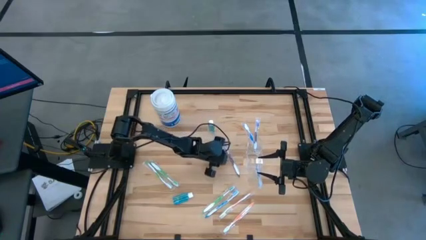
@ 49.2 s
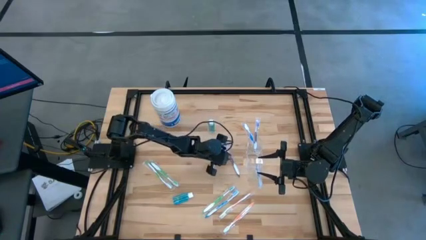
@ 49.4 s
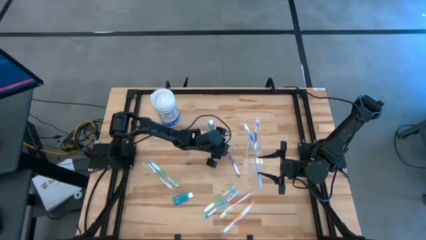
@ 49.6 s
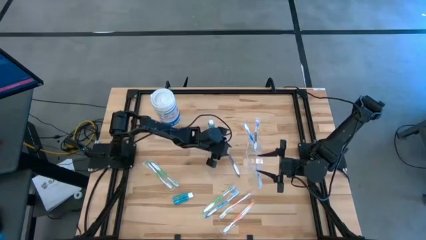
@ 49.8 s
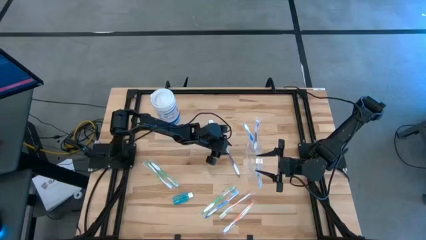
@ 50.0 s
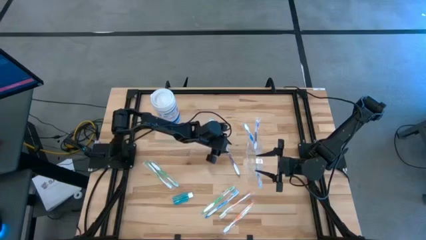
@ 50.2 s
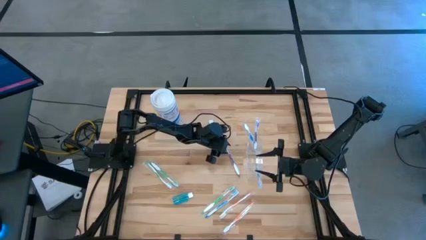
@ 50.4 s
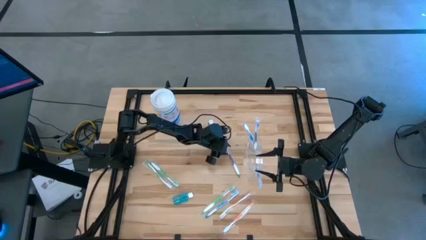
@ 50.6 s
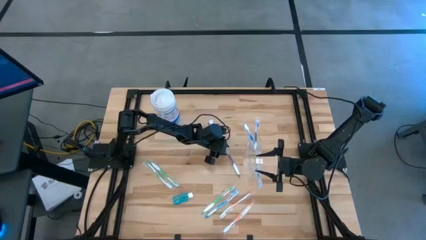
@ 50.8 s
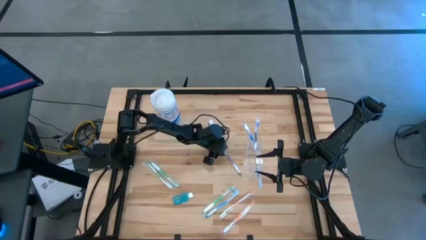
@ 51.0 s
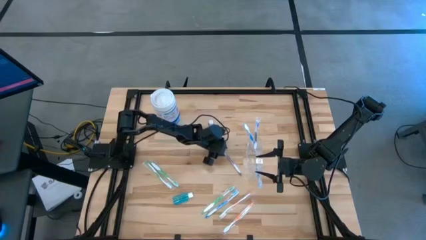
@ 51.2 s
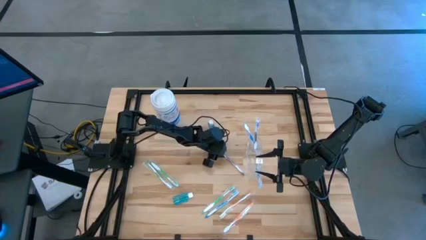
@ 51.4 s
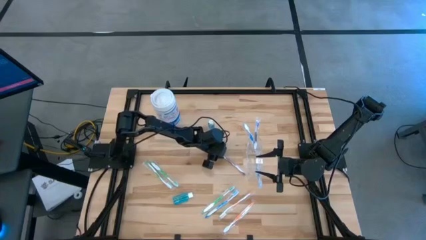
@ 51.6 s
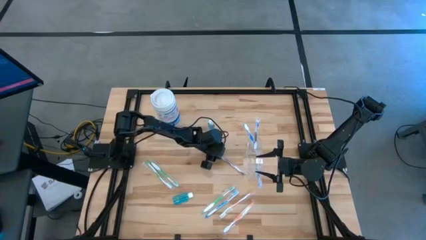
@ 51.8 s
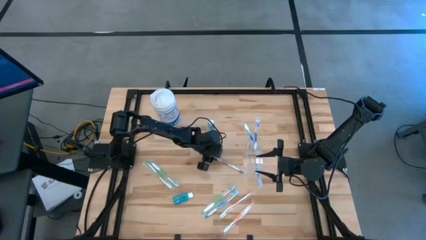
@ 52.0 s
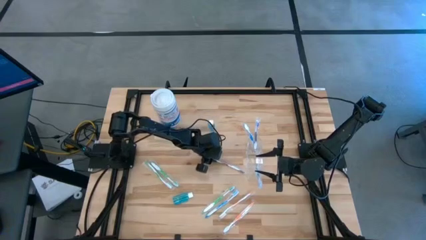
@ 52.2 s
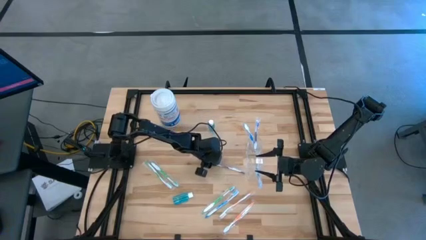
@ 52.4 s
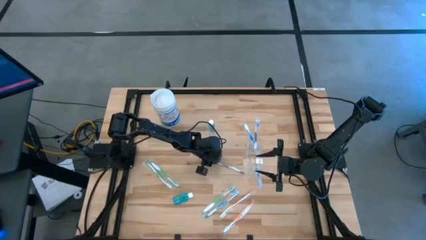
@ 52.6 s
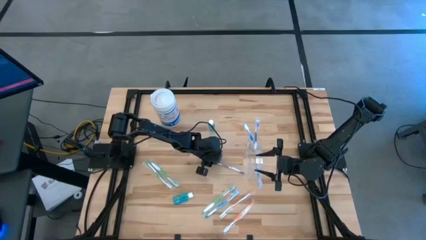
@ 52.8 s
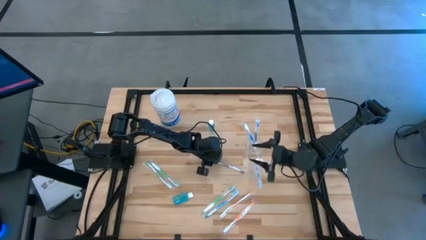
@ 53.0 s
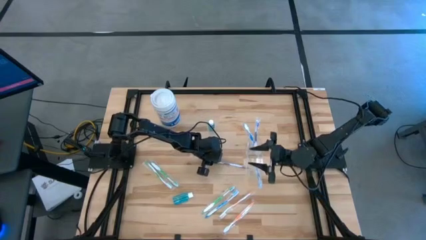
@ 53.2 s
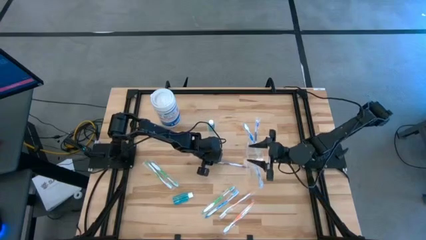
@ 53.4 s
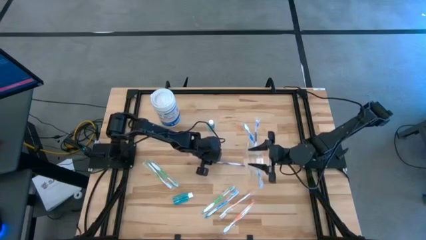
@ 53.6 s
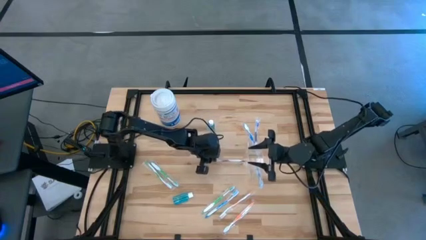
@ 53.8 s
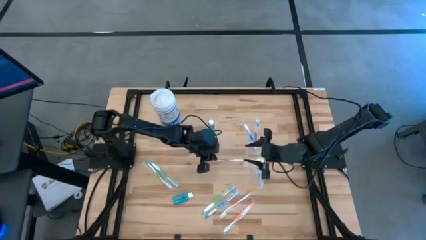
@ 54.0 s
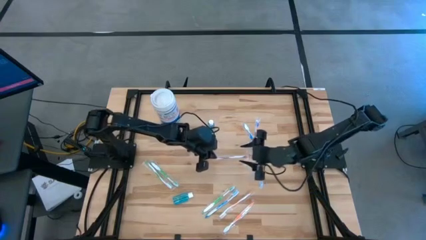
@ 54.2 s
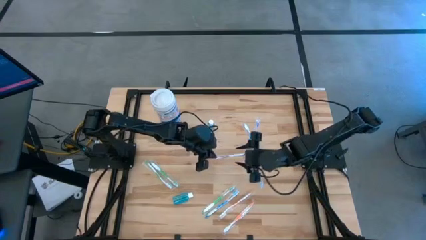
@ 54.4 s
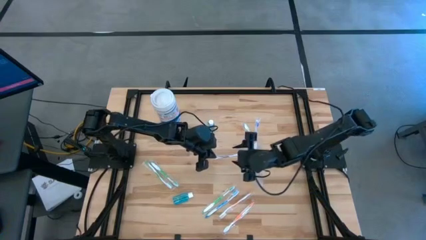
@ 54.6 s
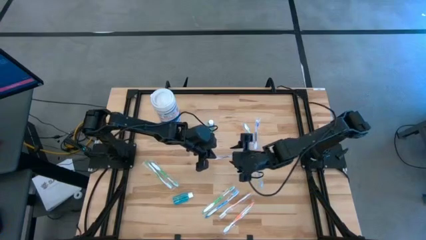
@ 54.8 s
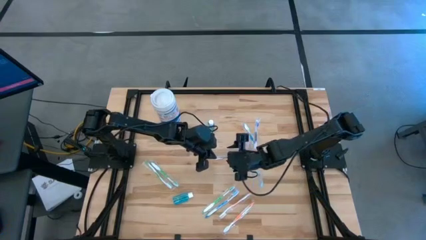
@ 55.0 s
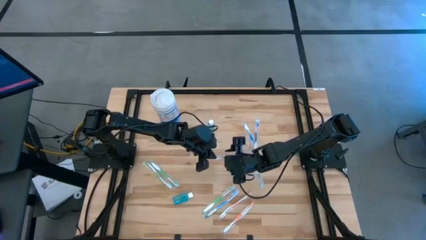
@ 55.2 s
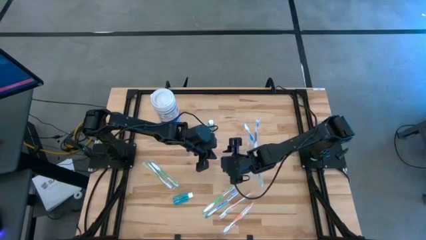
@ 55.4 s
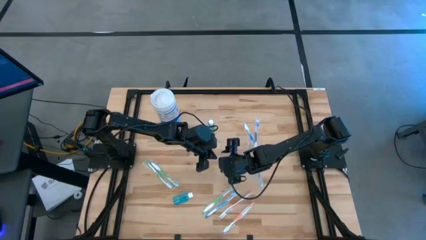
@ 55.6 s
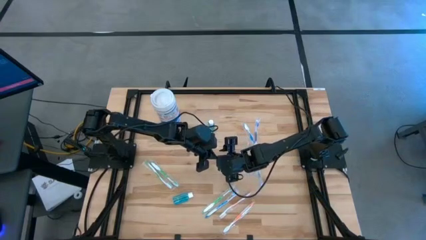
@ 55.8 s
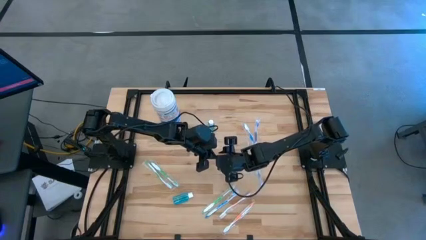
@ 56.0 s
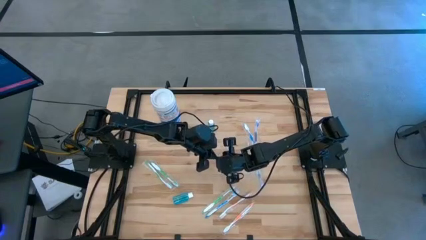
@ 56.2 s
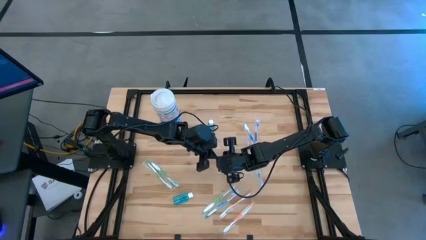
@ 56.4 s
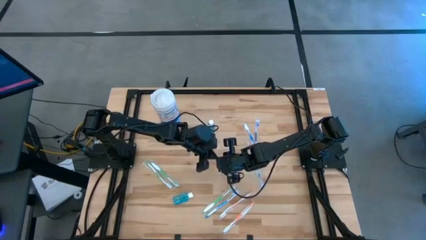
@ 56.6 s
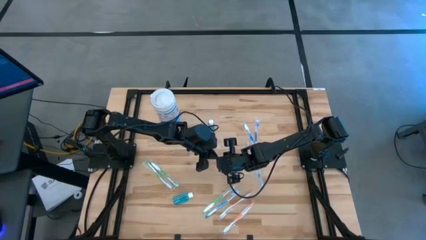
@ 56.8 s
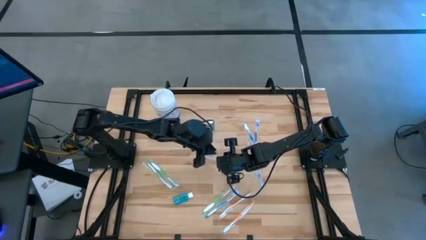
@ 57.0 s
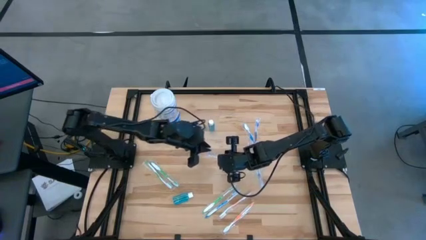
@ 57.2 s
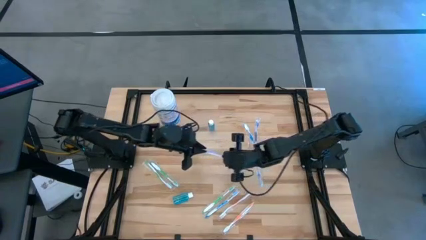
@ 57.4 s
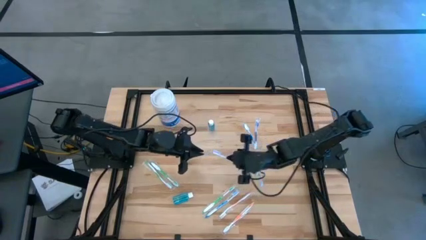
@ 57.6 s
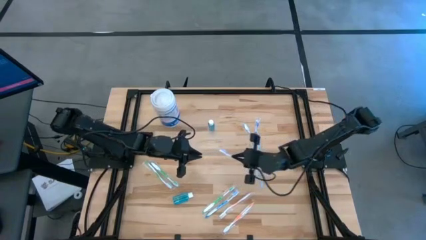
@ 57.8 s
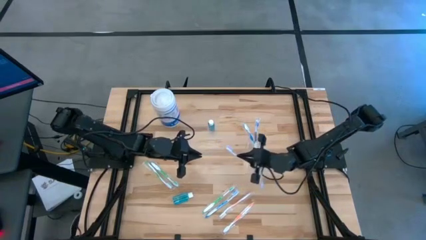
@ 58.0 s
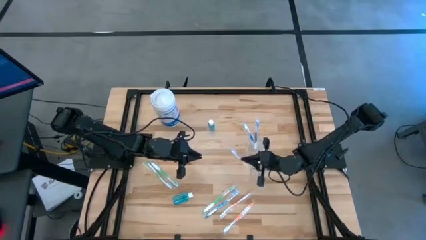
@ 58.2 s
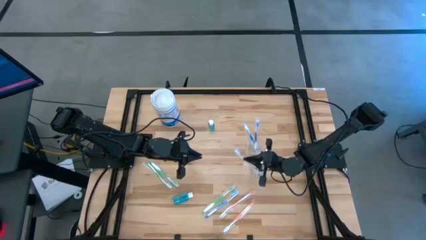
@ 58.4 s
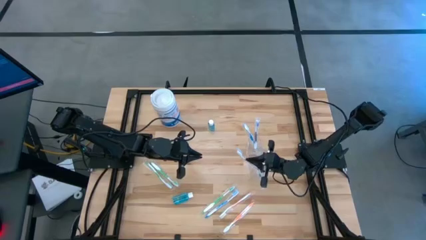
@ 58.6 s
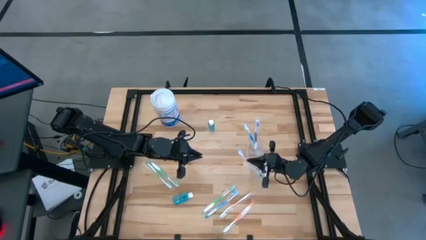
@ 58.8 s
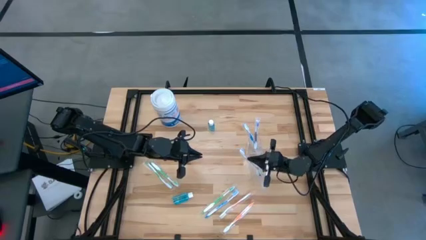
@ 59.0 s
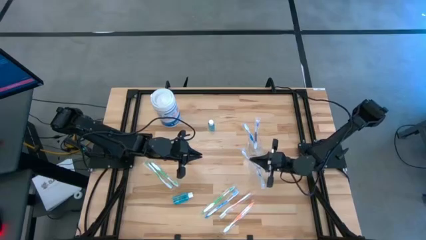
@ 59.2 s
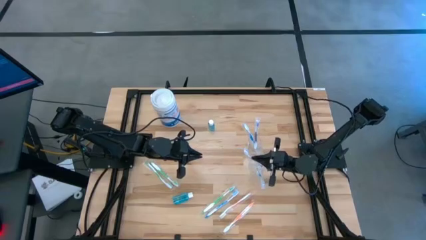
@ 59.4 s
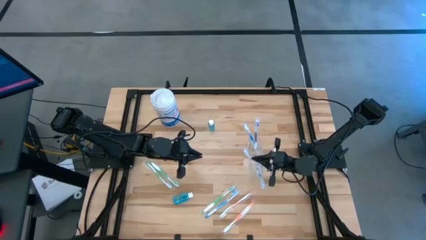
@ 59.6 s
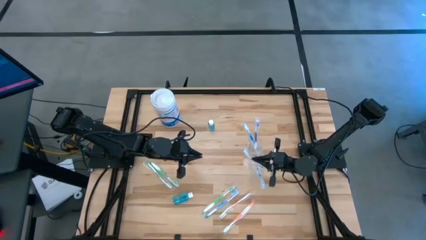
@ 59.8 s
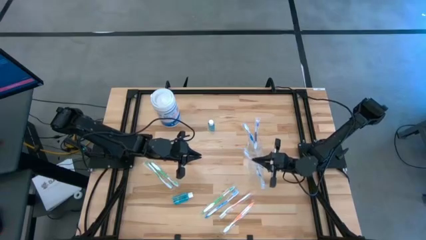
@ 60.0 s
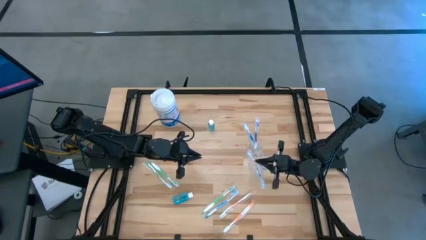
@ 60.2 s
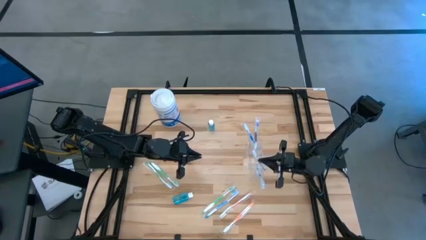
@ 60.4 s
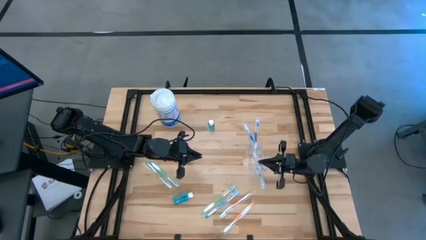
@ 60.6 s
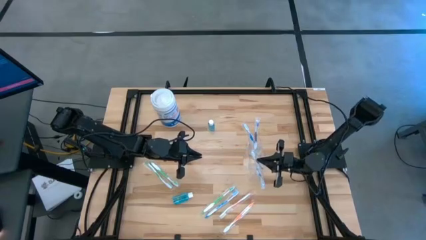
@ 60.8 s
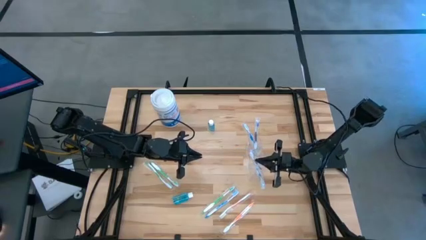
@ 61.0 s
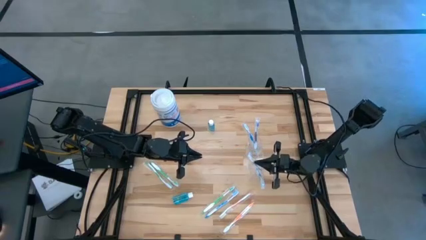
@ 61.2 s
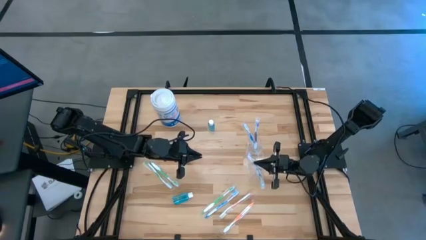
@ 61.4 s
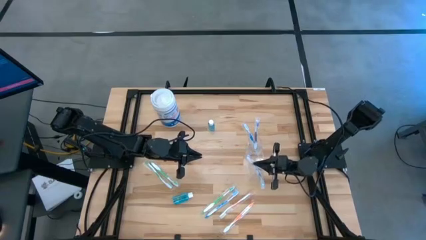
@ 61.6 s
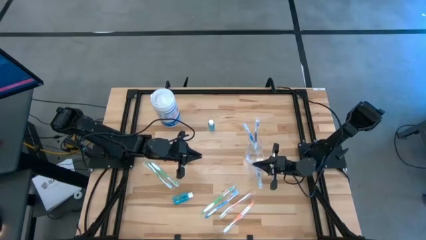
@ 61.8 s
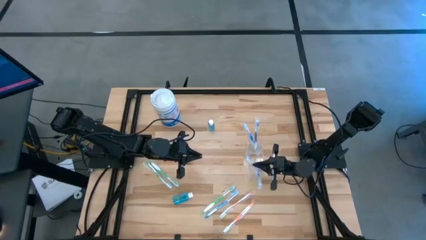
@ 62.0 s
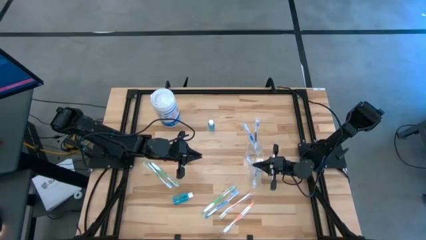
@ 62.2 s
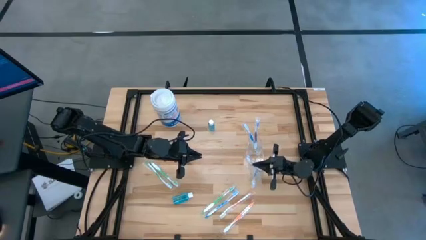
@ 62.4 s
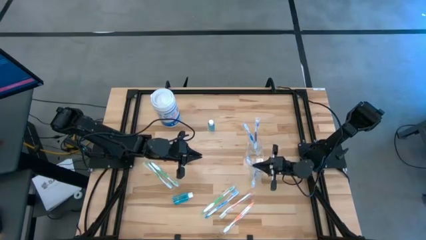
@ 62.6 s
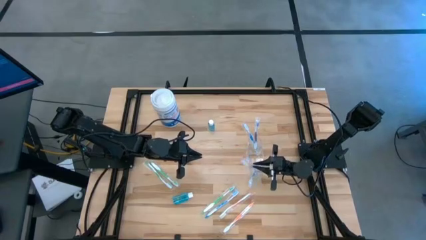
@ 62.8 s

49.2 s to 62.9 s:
Task: Pick & Place toothbrushing station
Put the purple toothbrush into the transparent organizer

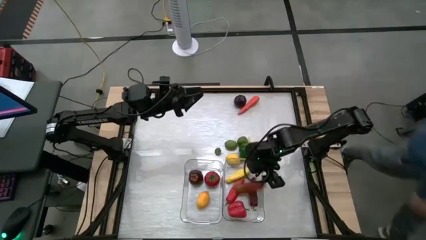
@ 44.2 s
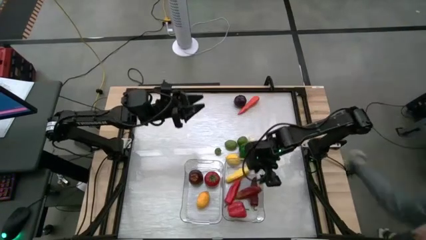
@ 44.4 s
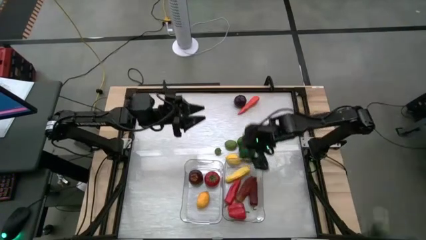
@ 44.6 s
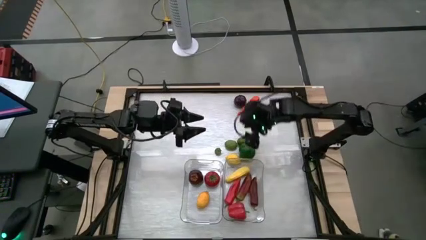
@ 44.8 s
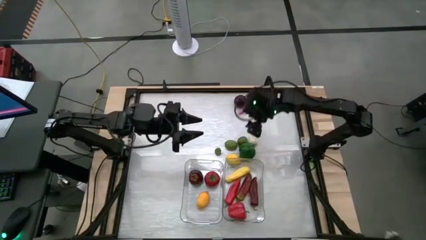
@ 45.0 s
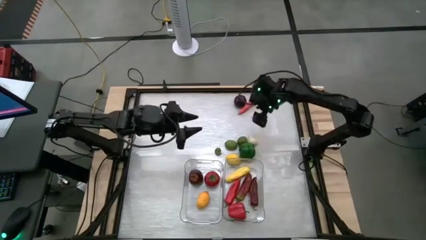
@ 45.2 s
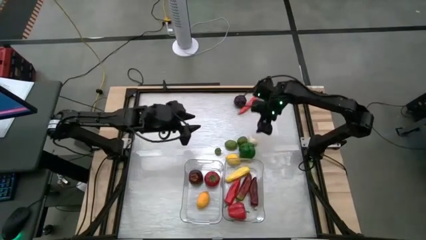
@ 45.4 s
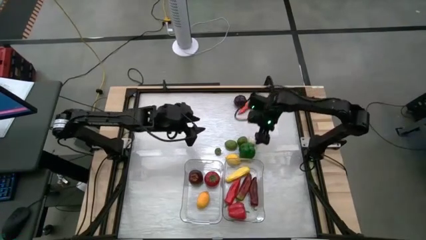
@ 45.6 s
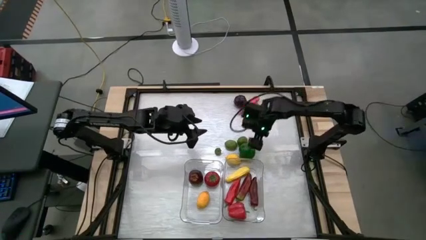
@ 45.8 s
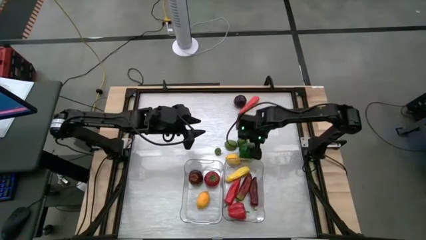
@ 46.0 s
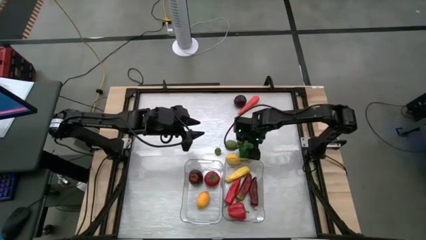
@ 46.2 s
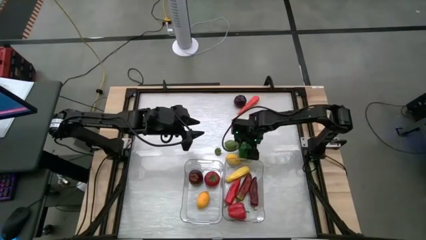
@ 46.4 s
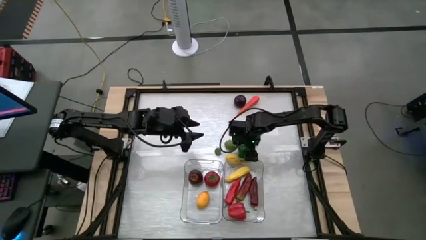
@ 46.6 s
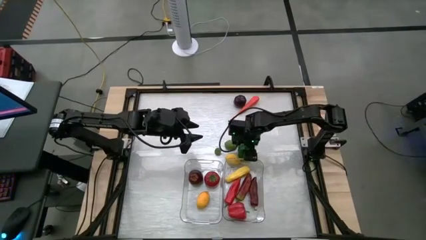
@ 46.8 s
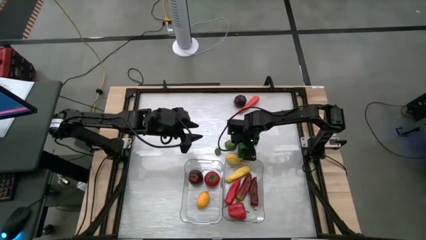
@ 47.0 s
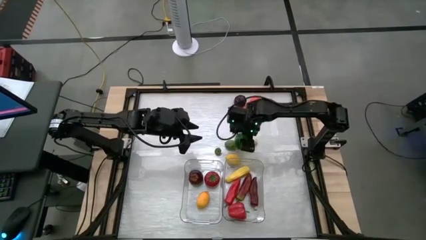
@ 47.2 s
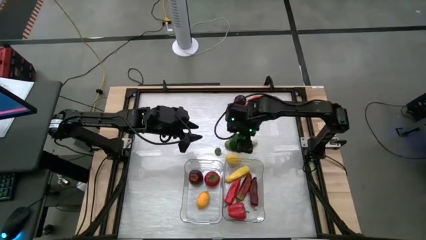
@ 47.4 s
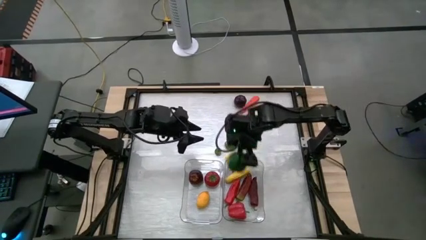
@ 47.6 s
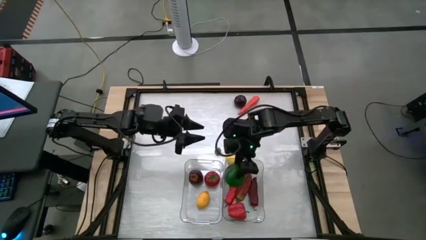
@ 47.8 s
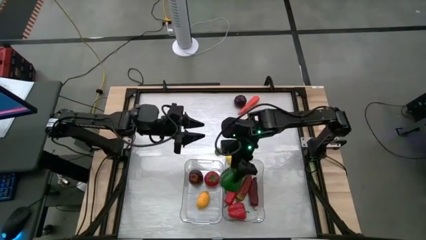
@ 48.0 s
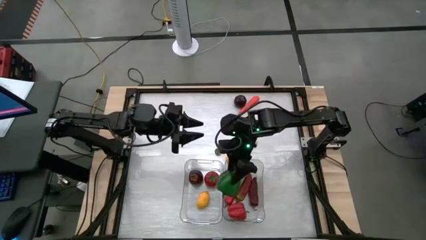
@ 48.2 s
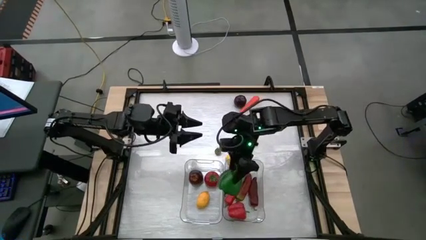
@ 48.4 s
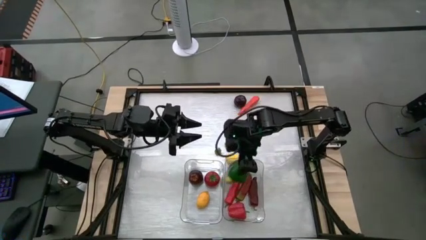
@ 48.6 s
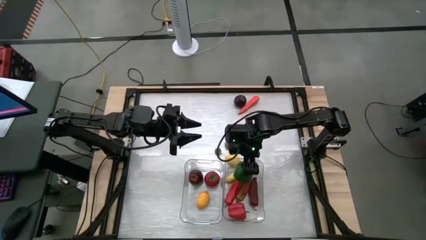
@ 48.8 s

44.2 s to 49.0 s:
Task: Sort produce into baskets
Put the green bell pepper into the right transparent bin
